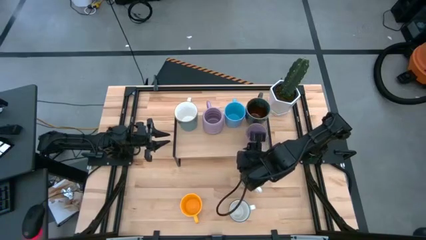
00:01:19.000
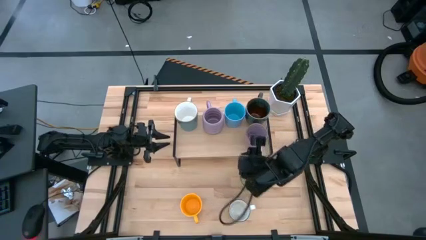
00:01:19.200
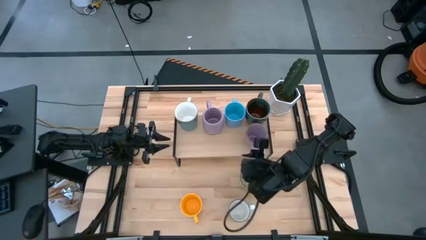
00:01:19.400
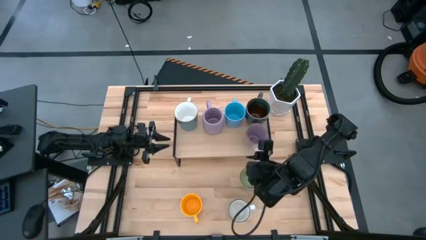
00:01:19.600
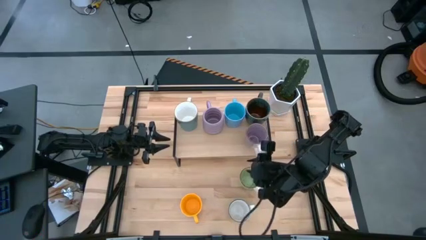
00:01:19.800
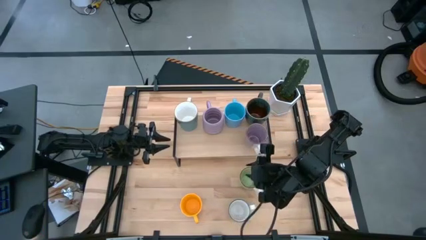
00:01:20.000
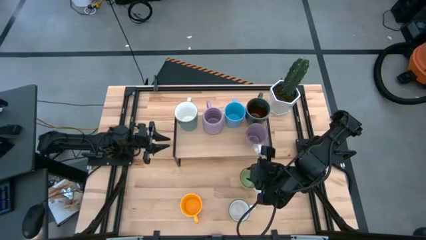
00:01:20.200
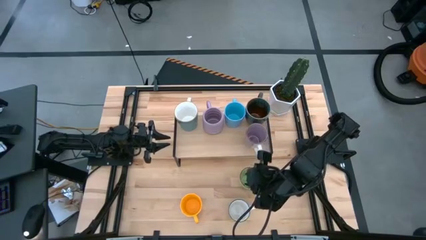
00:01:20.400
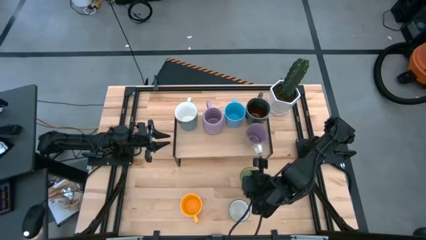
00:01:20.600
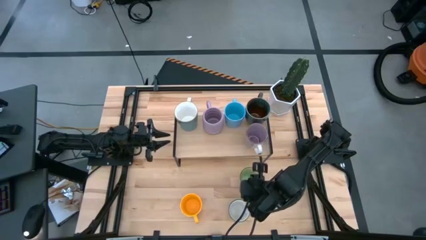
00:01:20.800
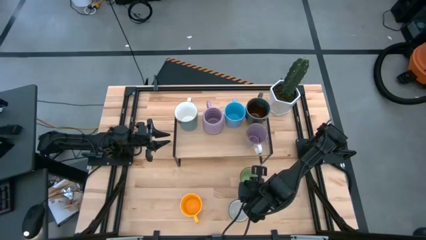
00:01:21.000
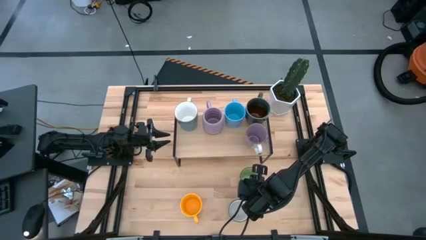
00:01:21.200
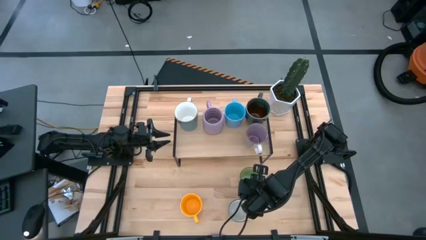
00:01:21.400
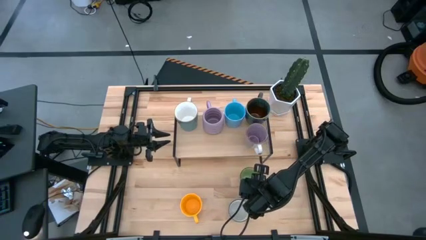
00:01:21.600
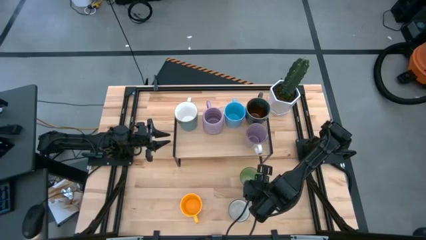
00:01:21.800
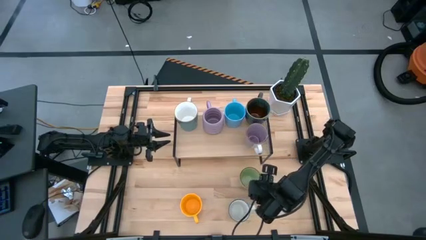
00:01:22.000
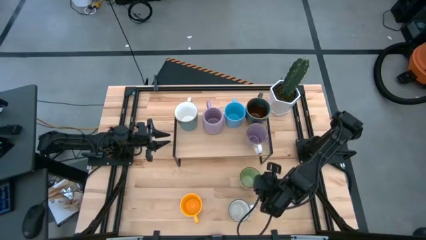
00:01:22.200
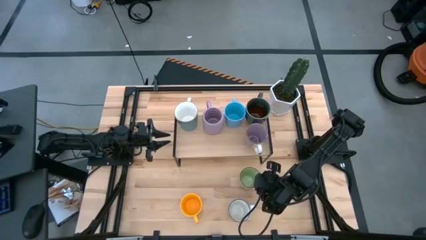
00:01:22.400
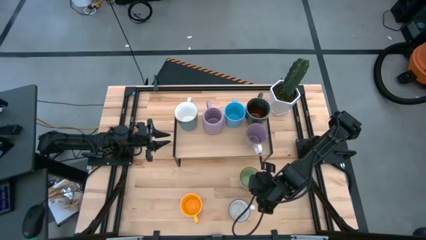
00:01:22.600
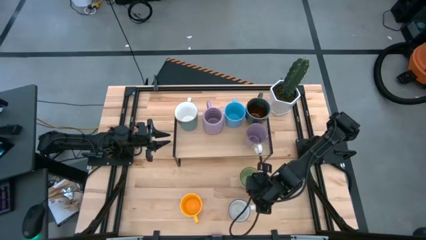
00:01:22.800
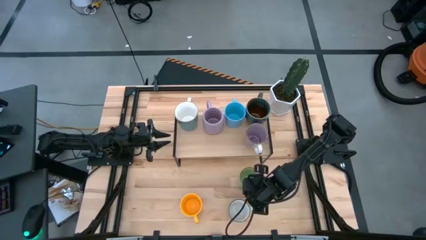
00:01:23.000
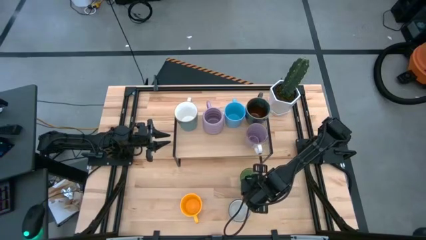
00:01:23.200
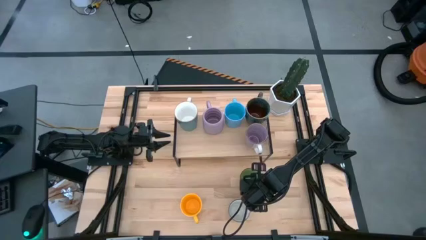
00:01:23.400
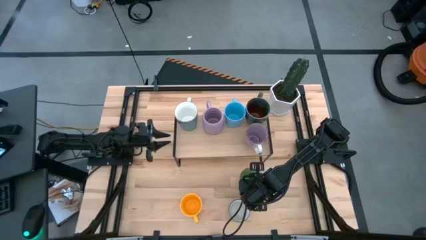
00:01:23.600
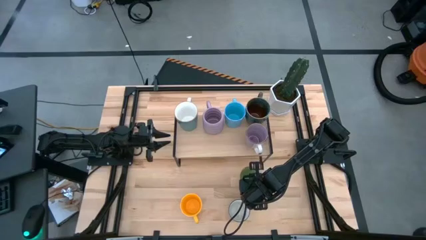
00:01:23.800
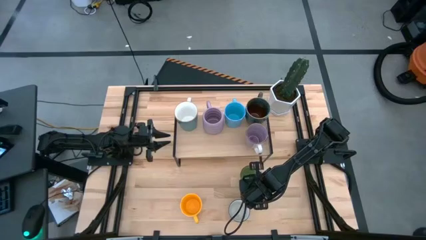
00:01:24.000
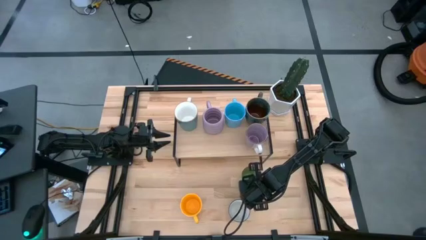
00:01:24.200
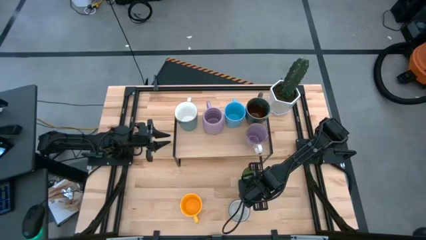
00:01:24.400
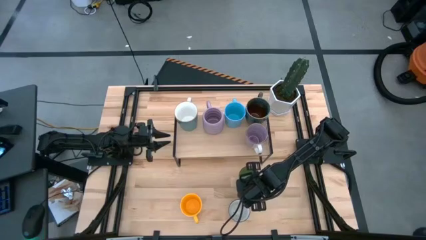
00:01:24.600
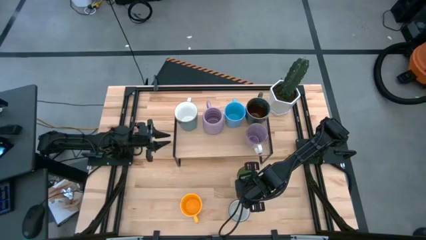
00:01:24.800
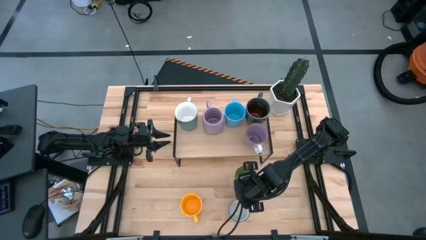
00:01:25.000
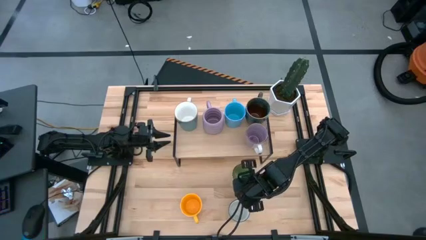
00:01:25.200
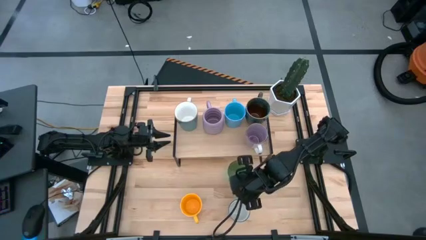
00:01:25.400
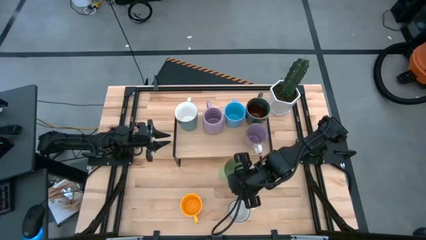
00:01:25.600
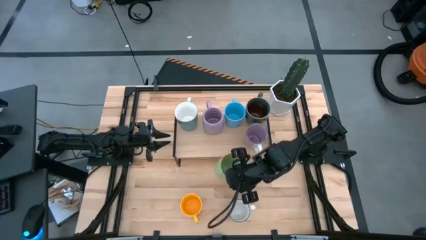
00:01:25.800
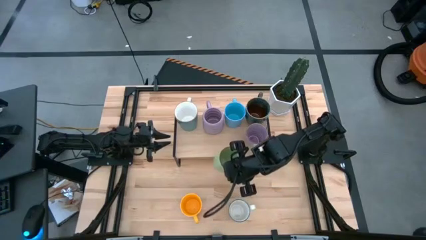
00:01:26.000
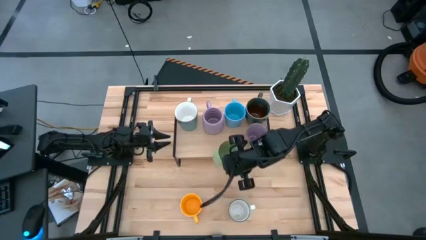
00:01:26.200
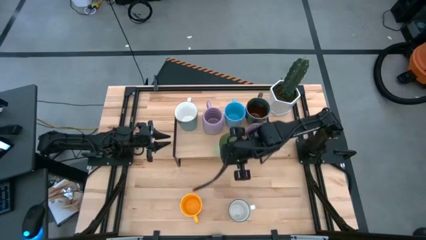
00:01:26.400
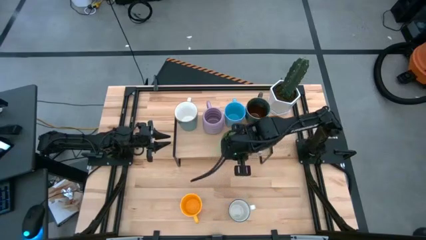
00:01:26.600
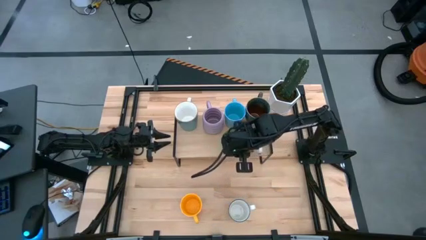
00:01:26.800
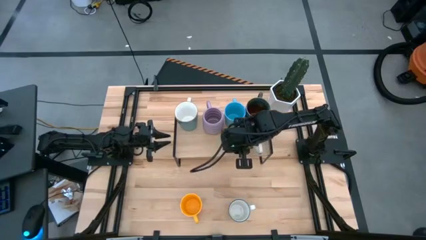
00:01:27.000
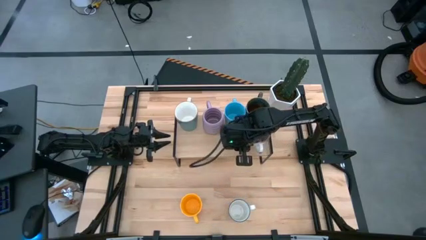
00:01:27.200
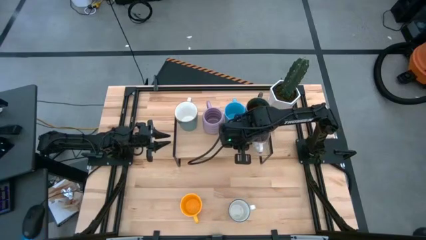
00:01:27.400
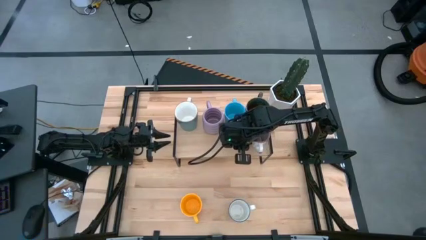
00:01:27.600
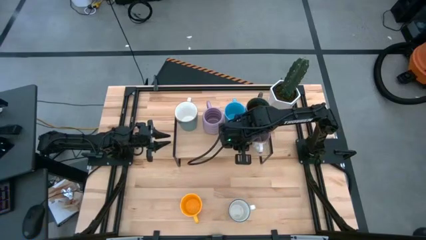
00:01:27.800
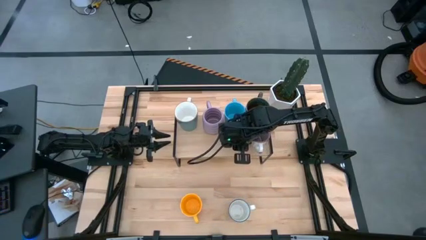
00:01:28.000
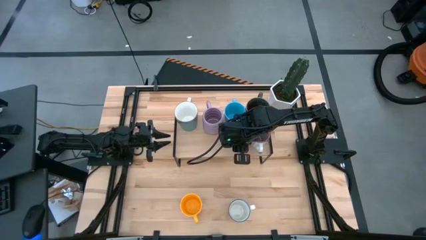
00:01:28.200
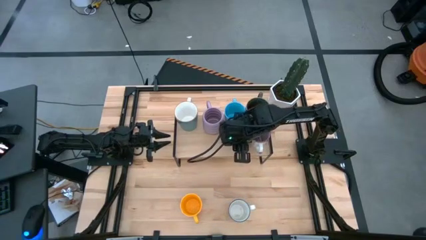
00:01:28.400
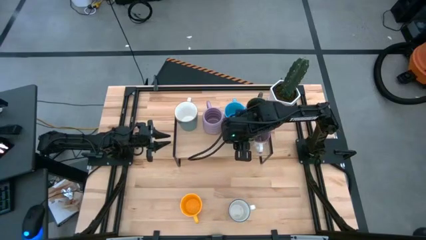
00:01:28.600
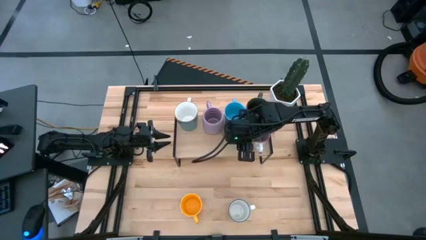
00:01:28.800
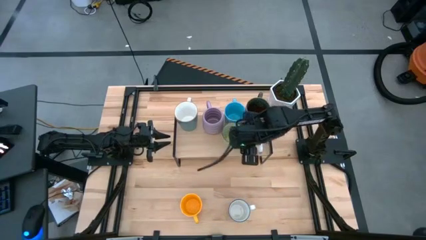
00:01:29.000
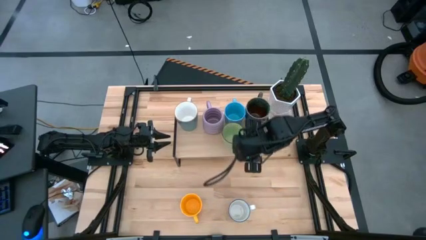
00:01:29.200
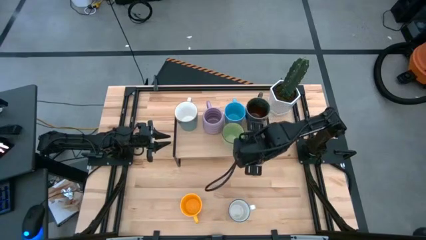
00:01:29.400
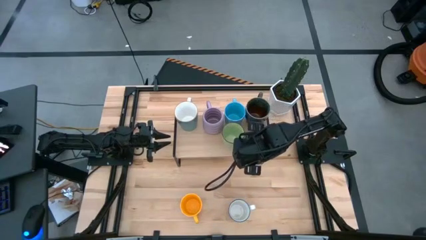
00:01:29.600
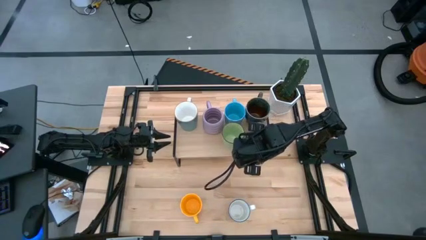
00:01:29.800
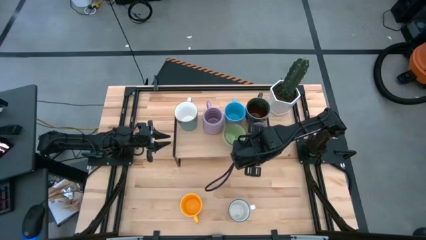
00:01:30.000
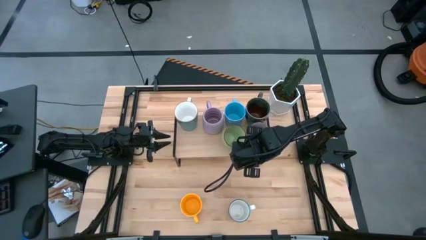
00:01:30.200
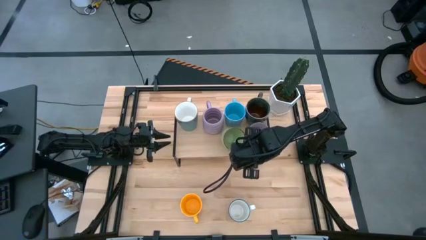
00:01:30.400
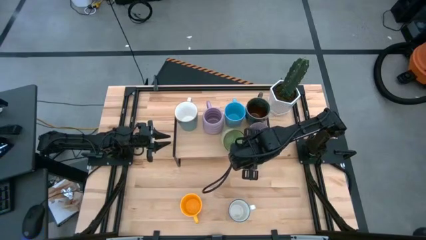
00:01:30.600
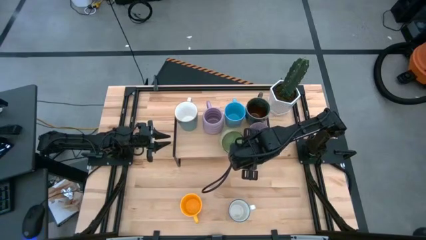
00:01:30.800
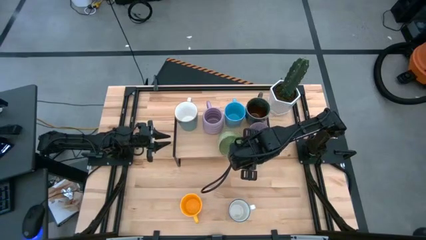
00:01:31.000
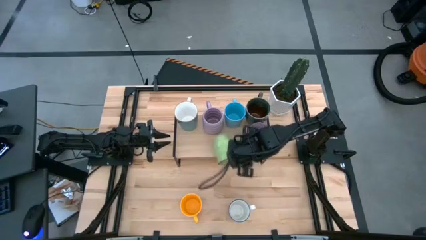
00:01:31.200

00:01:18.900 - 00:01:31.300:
Task: Place coffee mugs
Put the green mug on the shelf
